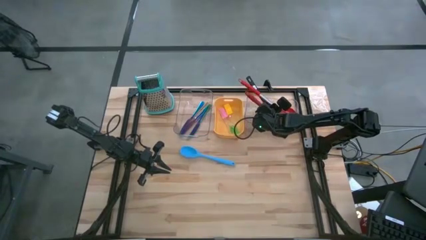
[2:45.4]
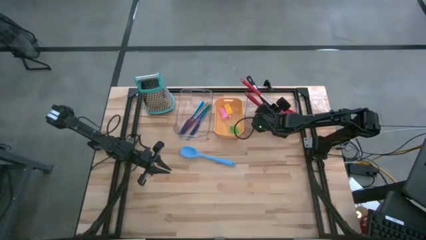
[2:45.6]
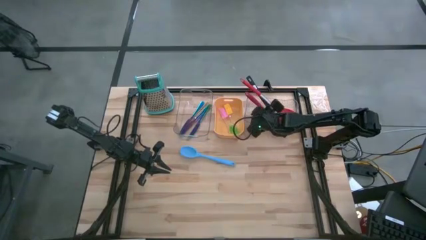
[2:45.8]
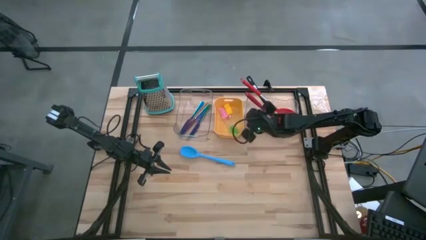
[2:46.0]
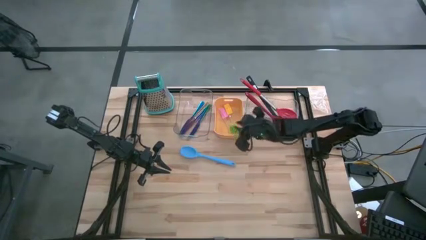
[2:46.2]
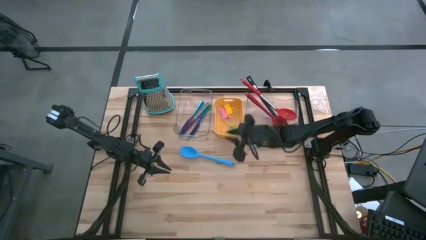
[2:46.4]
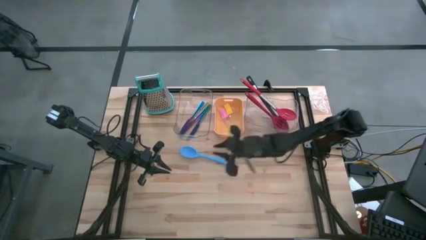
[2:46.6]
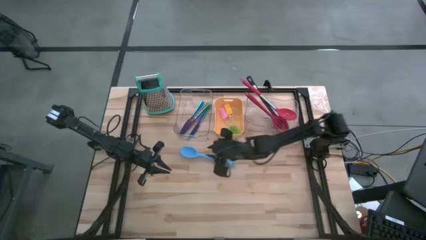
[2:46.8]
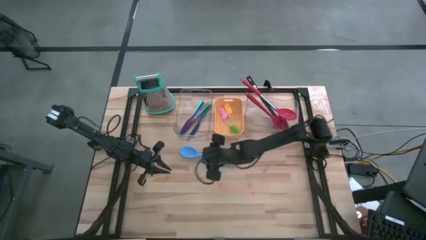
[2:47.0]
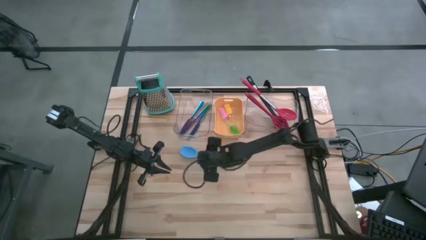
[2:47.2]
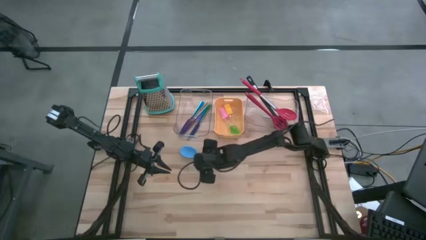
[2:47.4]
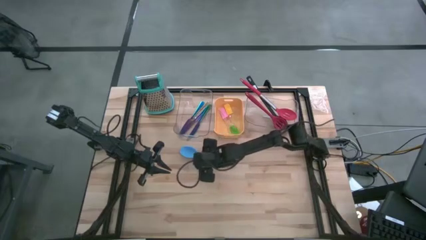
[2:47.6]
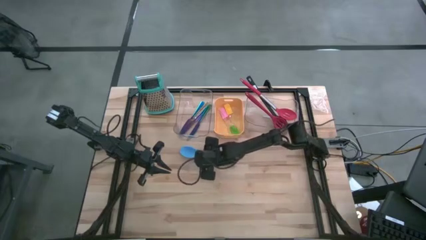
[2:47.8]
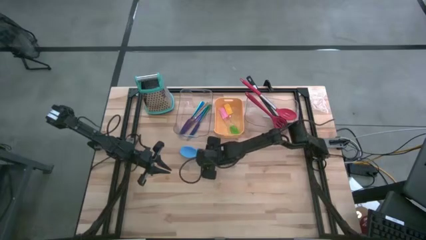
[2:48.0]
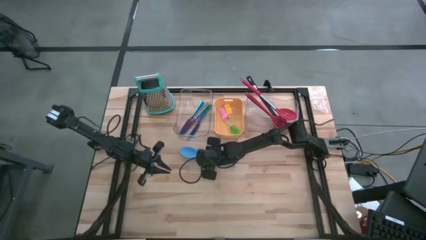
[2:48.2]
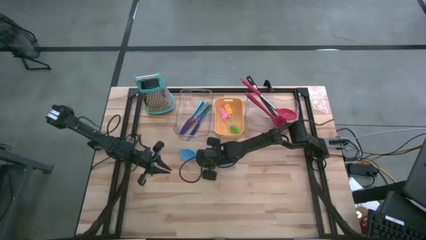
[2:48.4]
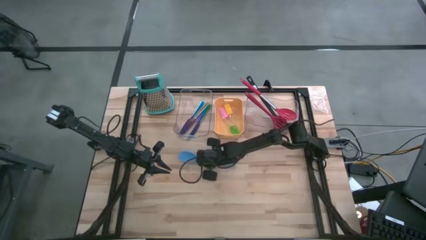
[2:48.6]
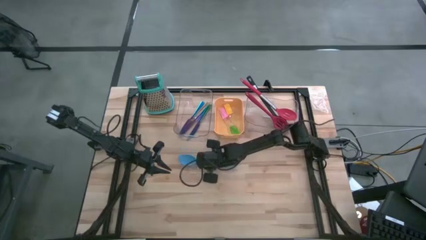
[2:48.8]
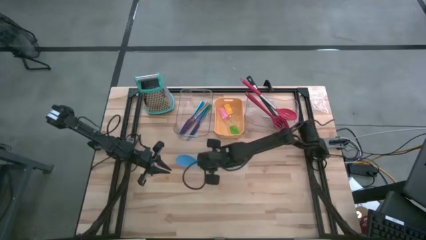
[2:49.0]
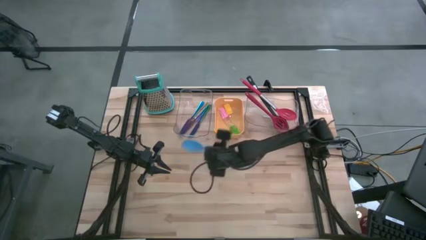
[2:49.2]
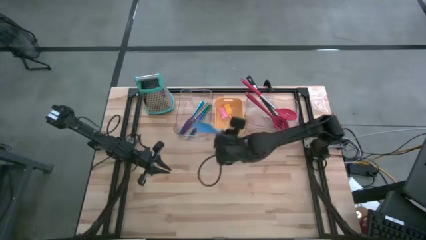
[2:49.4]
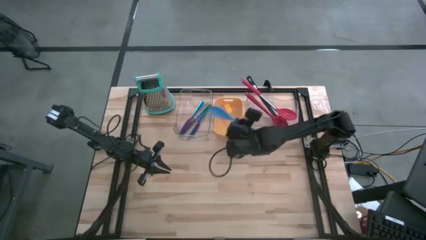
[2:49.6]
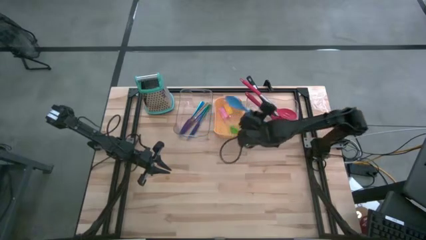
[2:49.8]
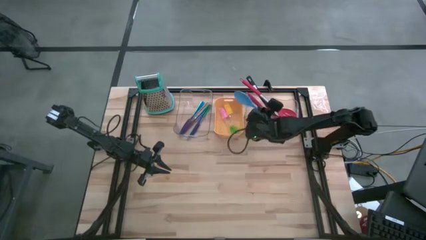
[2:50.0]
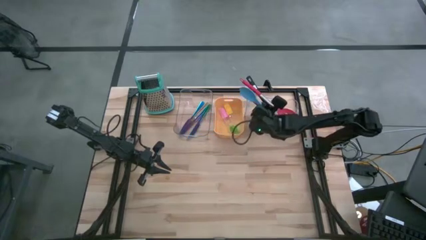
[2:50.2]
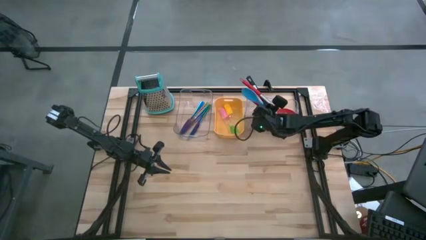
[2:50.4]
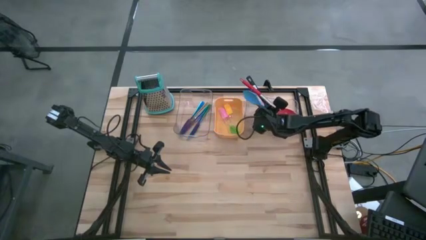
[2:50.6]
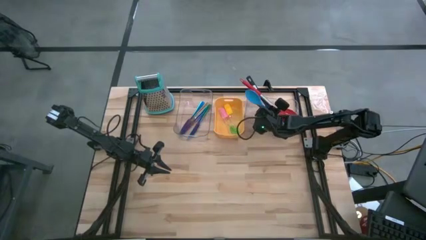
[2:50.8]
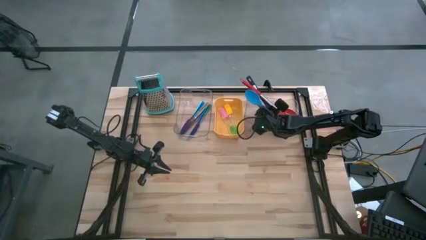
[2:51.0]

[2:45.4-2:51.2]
Task: Pick & Place Kitchen Items
Put the blue serving spoon into the right transparent bin

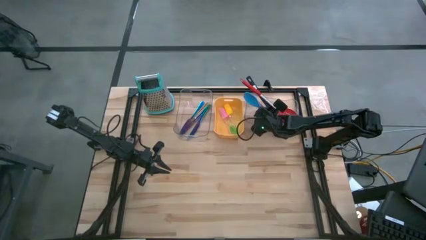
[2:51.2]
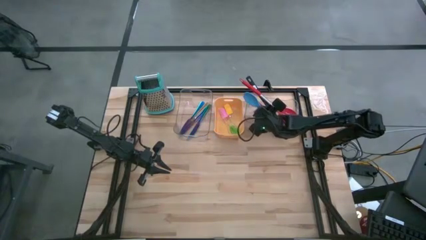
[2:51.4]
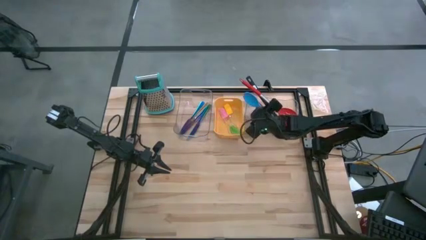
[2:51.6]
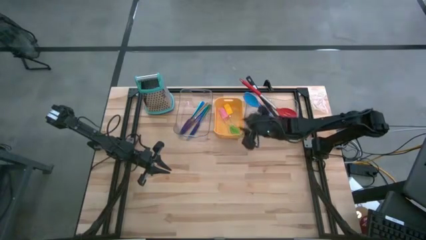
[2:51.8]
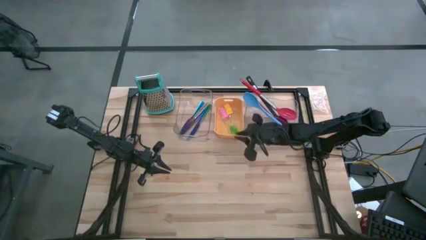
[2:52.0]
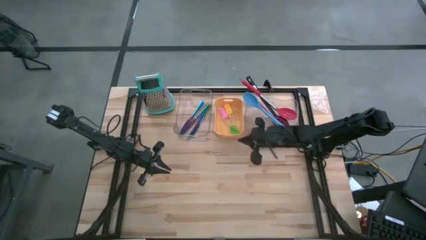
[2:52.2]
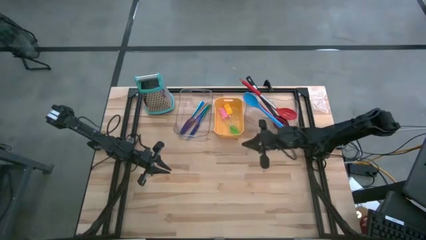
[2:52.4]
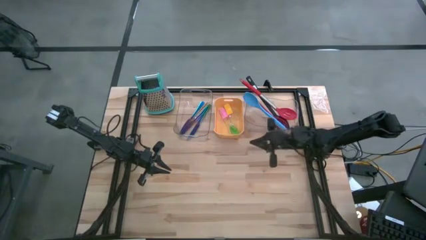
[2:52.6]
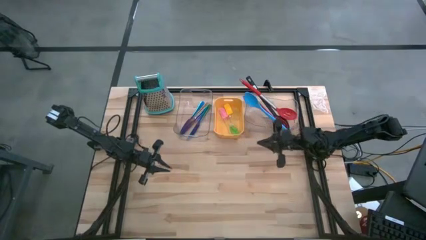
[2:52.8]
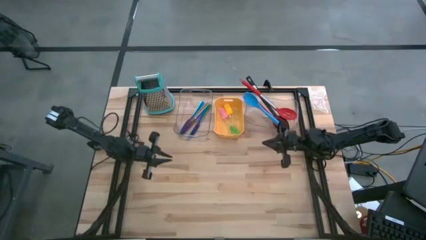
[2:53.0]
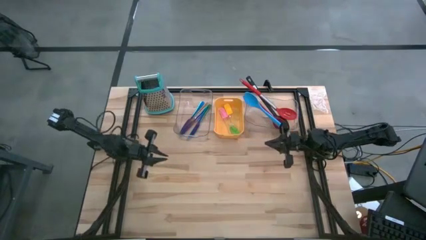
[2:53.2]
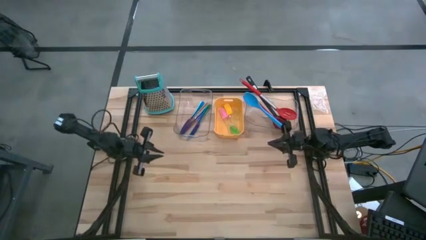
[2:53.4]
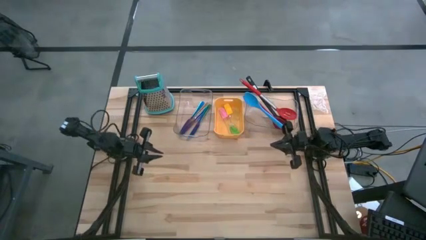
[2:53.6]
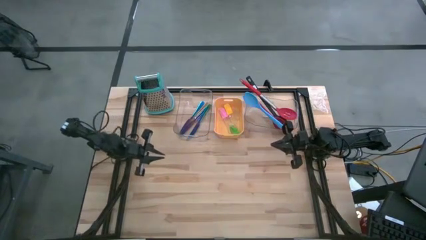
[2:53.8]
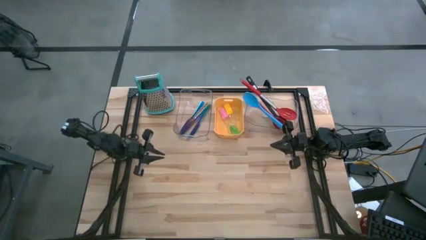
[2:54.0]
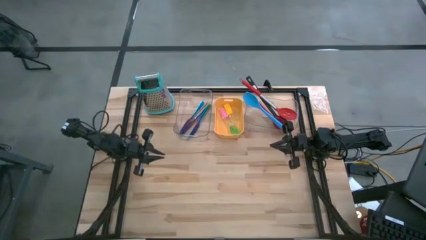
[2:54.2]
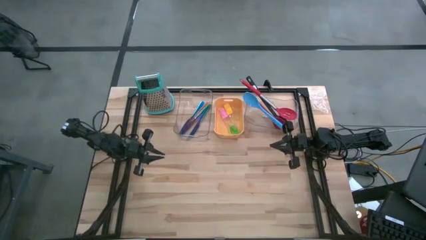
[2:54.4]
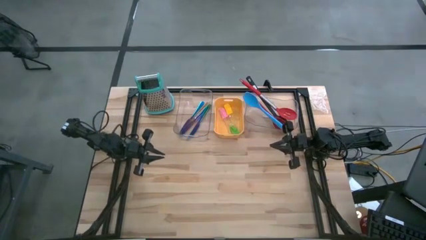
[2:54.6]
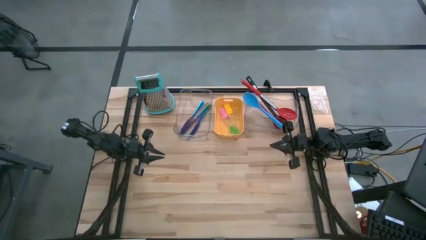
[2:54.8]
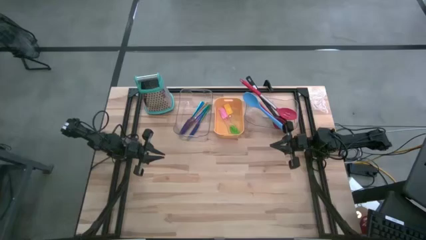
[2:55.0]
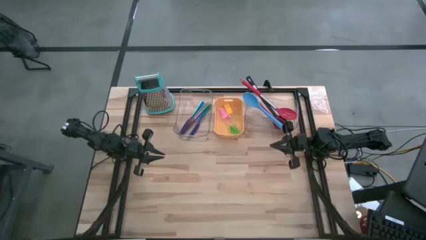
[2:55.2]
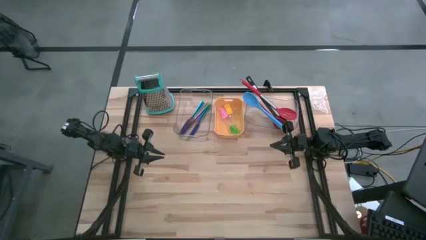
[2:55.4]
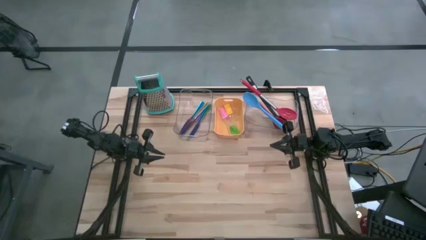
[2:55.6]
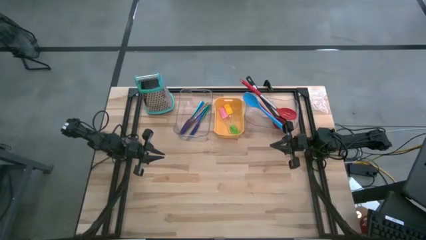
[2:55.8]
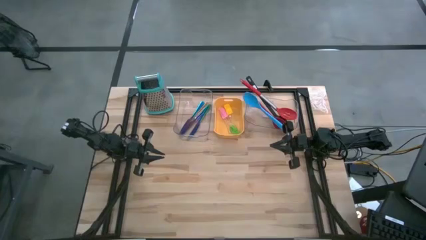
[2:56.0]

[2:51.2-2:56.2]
Return to Home Position
